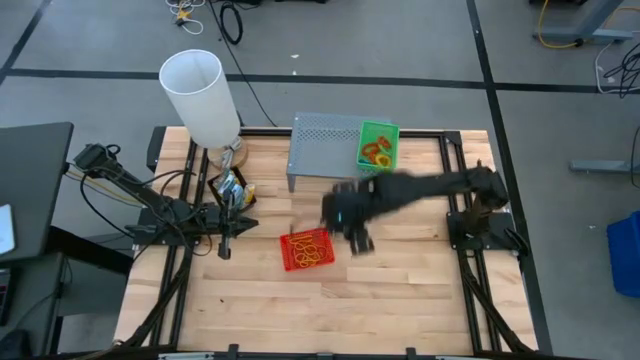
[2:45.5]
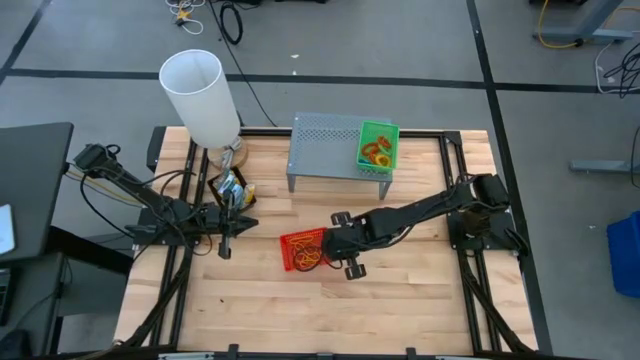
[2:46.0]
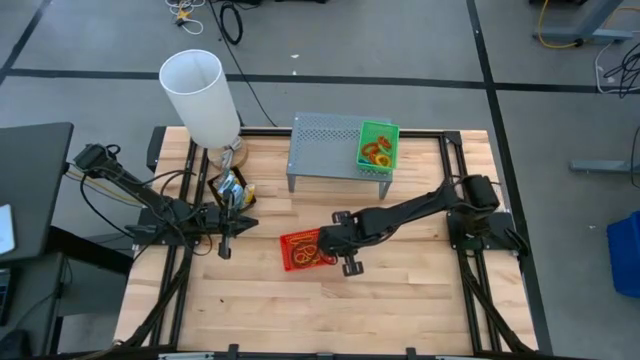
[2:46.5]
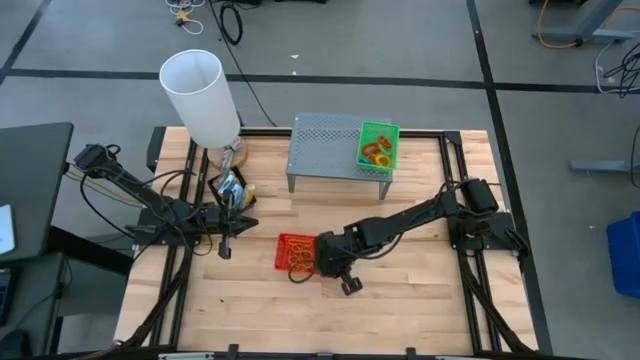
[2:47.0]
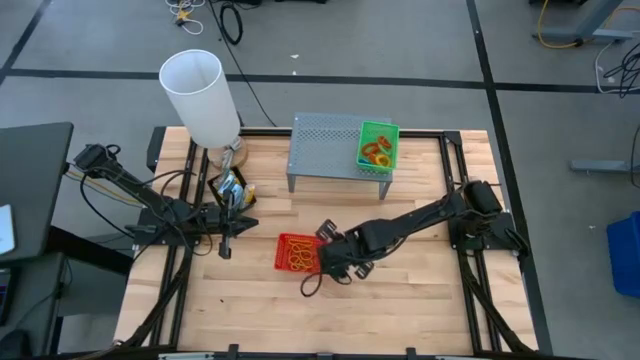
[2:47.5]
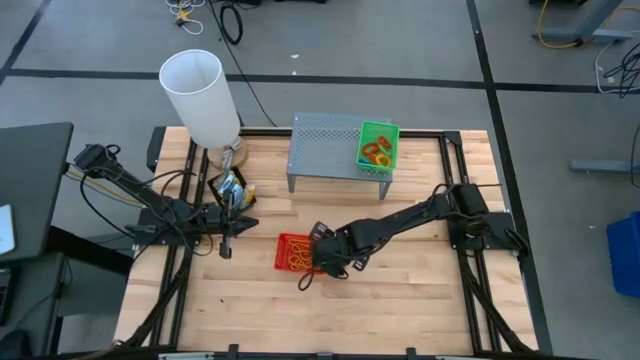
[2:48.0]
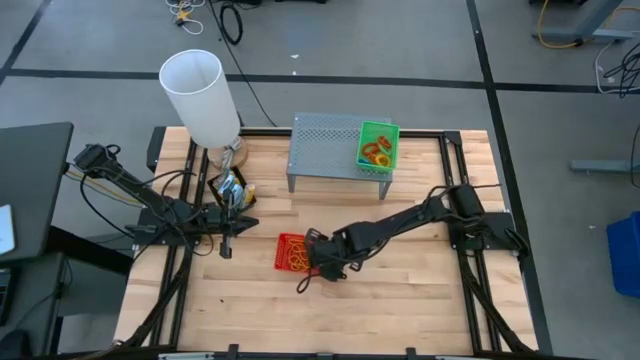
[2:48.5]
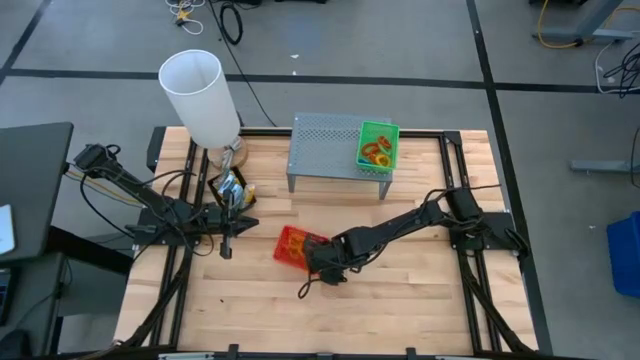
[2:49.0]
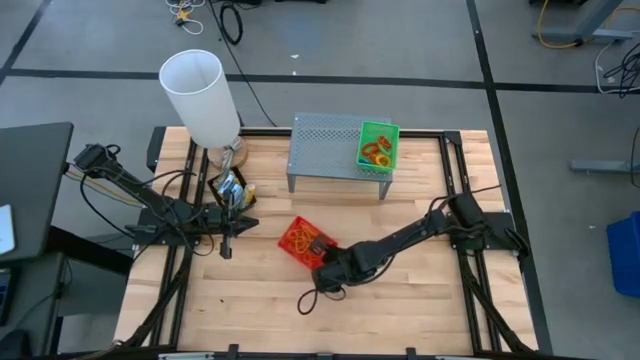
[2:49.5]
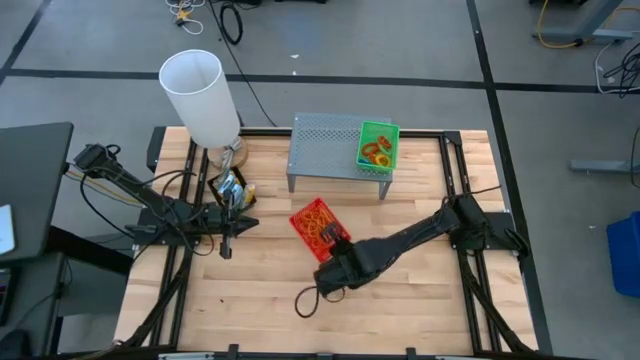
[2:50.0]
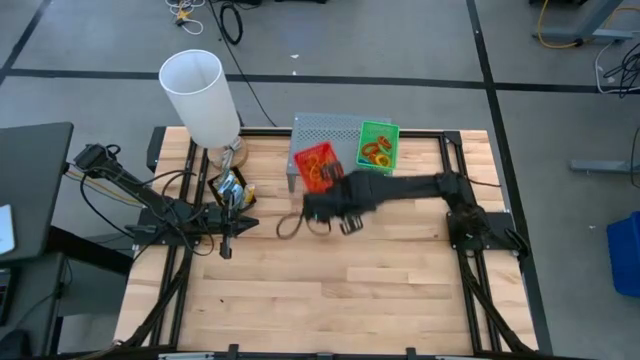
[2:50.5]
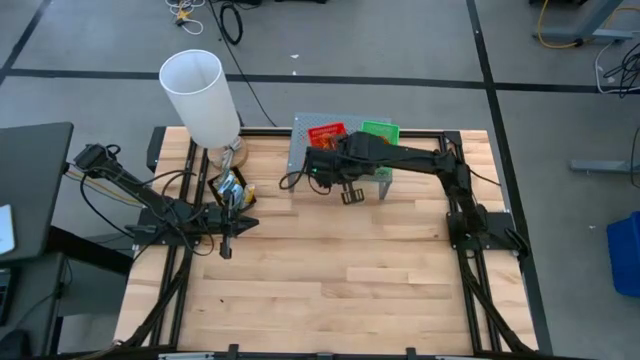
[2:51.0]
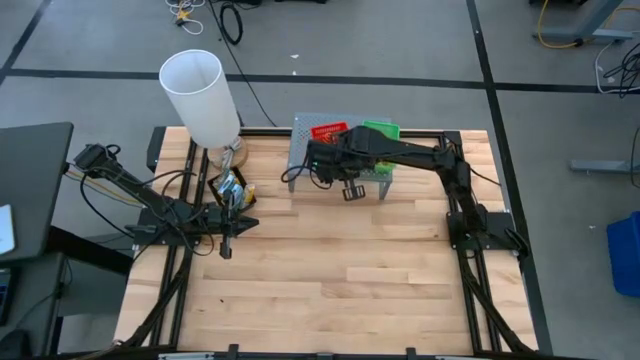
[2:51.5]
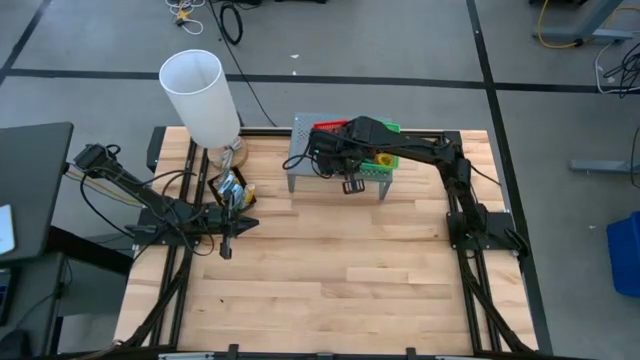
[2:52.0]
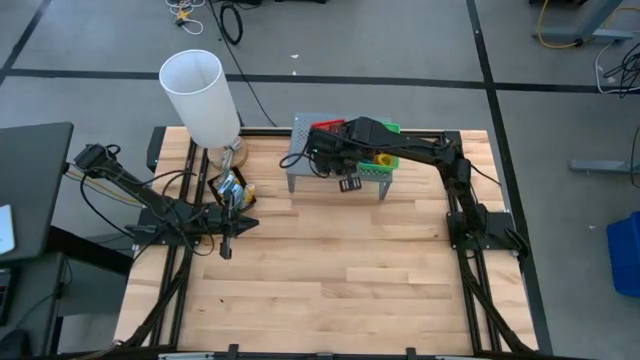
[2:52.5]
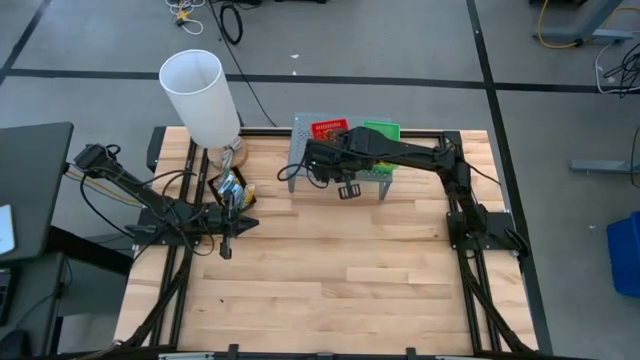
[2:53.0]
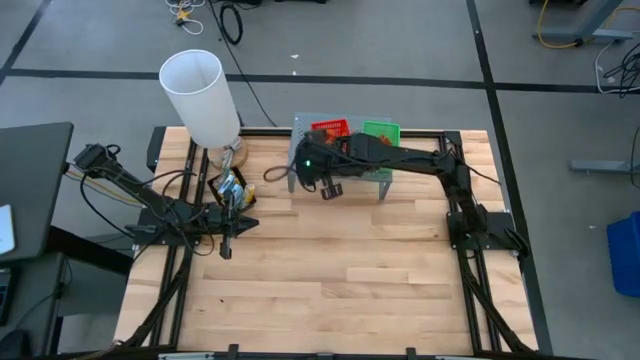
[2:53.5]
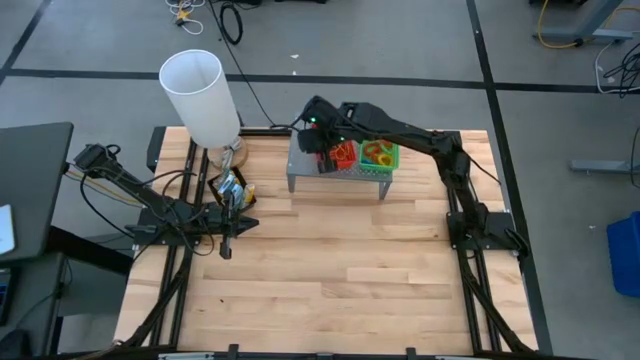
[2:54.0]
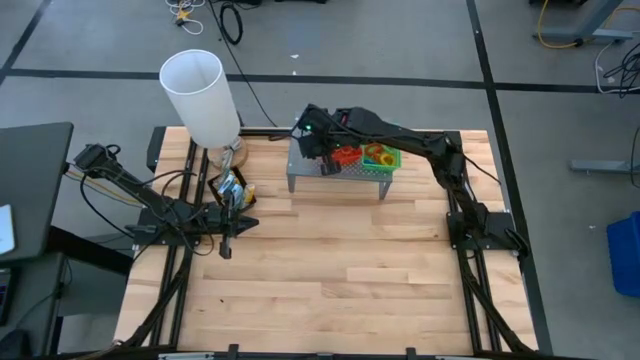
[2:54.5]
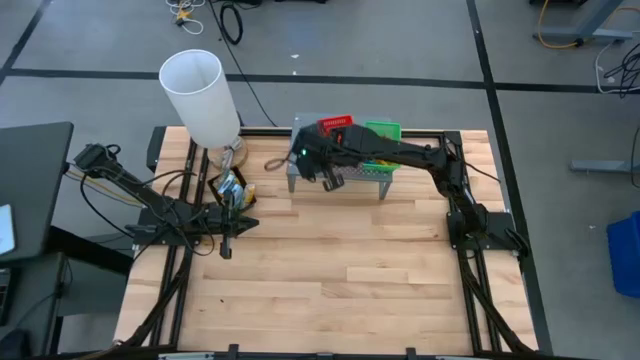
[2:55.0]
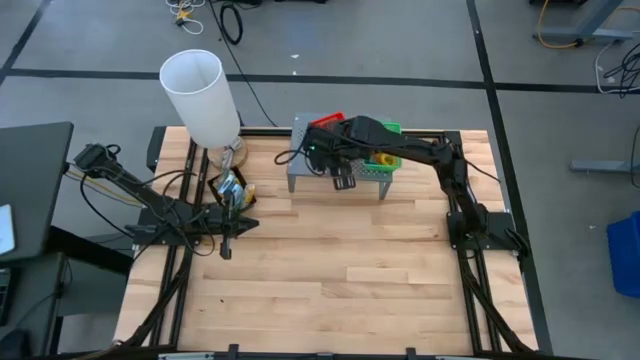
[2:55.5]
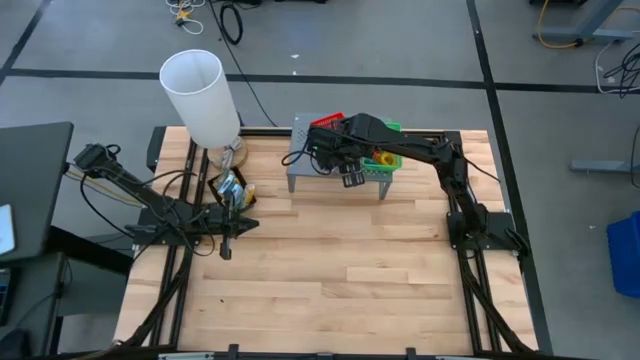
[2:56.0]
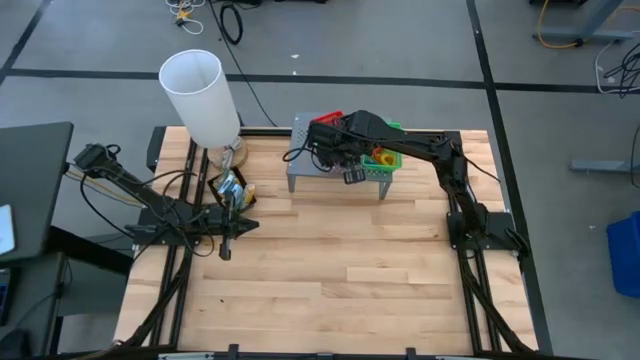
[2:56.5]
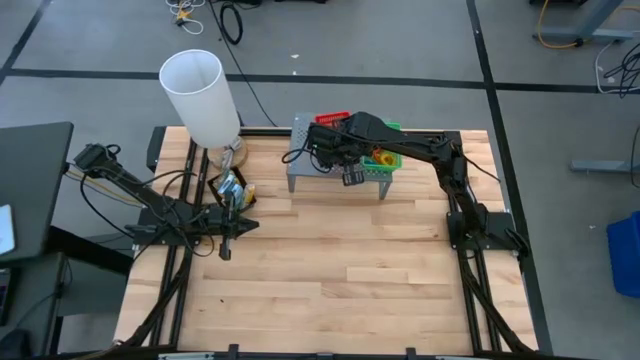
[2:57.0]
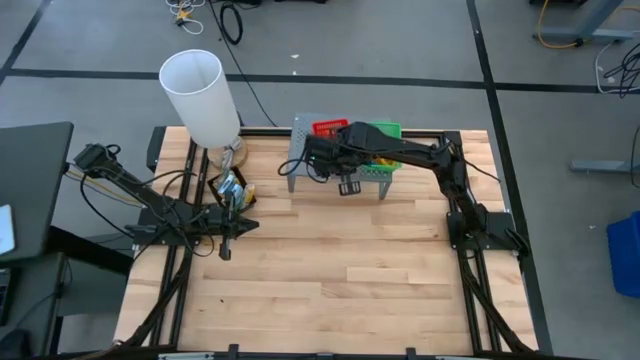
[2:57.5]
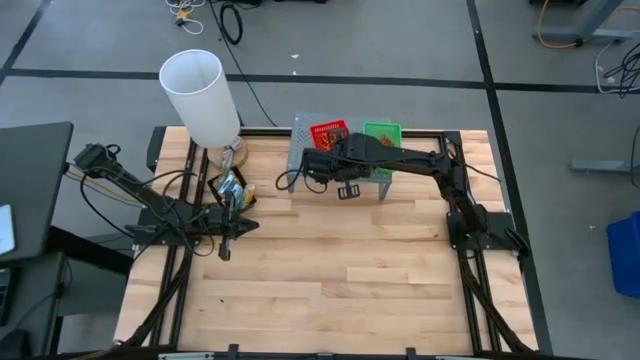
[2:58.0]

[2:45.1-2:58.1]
Task: Pick & Place Office Desk Supplies
Put the red bin on the shelf

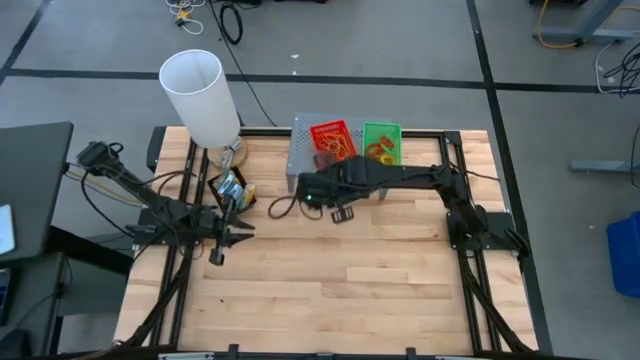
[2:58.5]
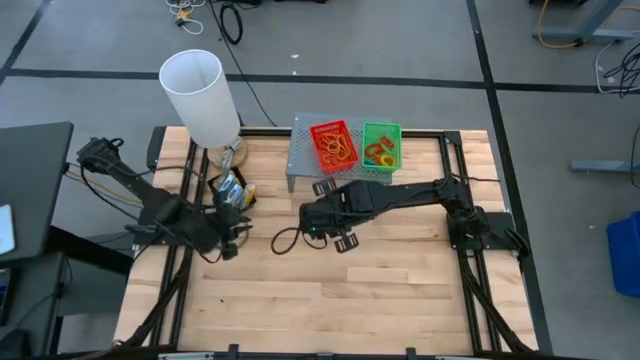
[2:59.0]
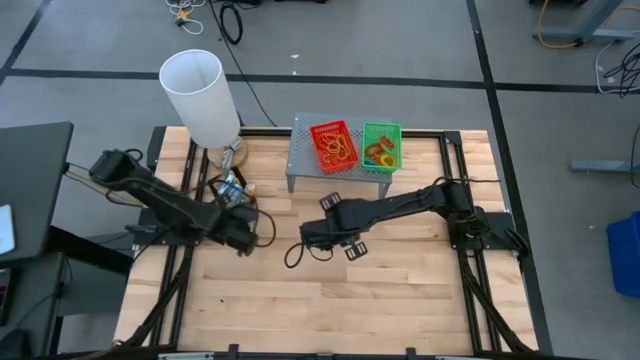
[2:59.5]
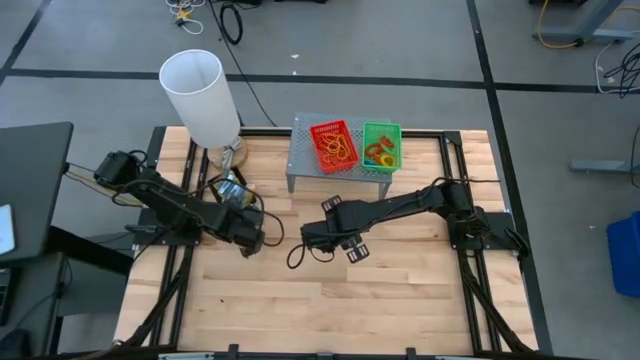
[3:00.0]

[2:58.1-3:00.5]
Put the black bin on the shelf

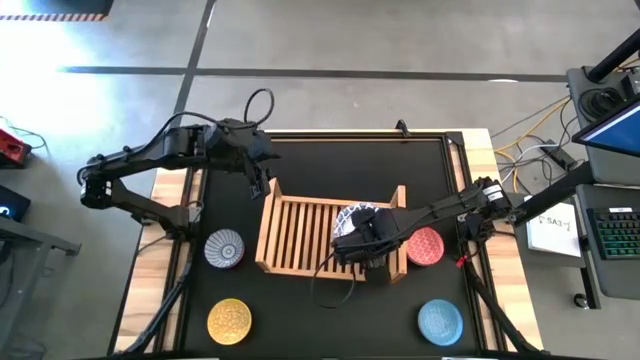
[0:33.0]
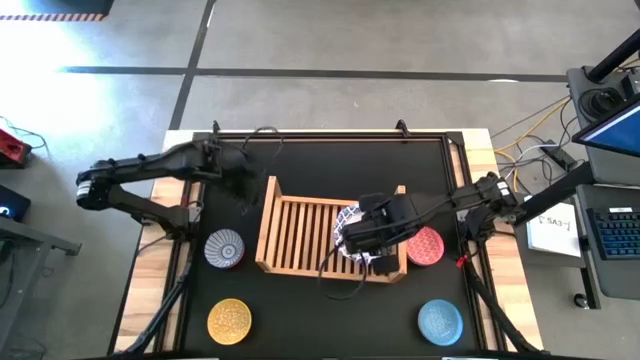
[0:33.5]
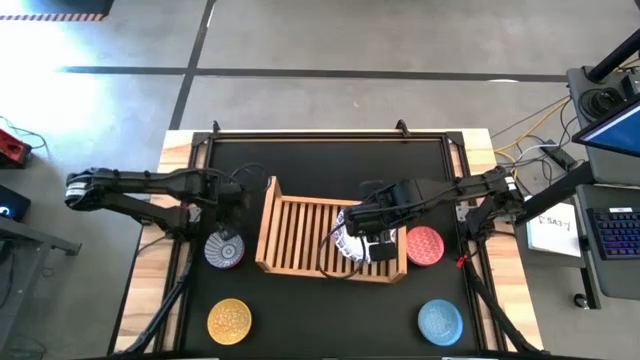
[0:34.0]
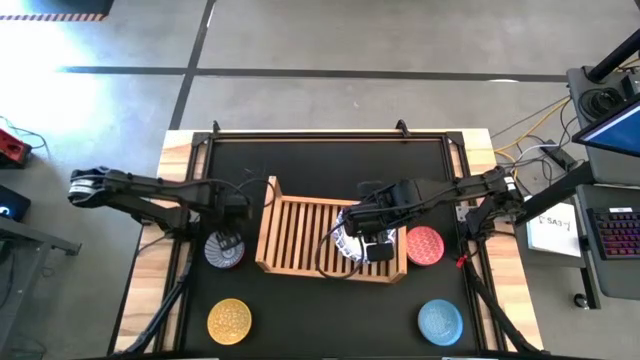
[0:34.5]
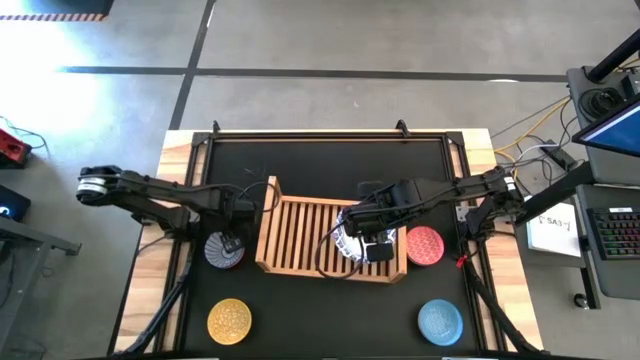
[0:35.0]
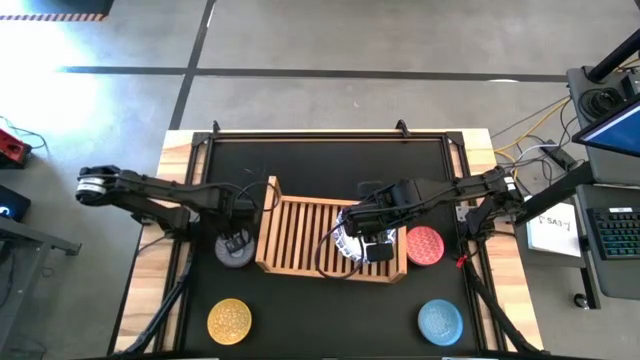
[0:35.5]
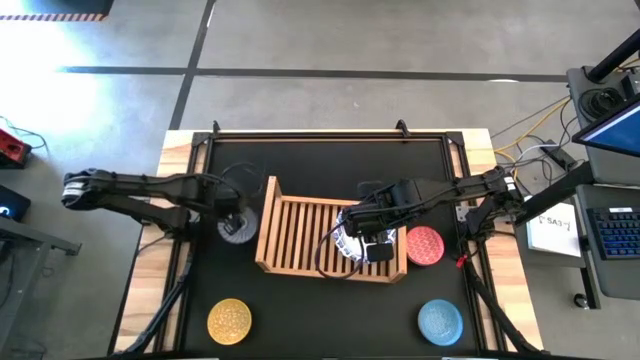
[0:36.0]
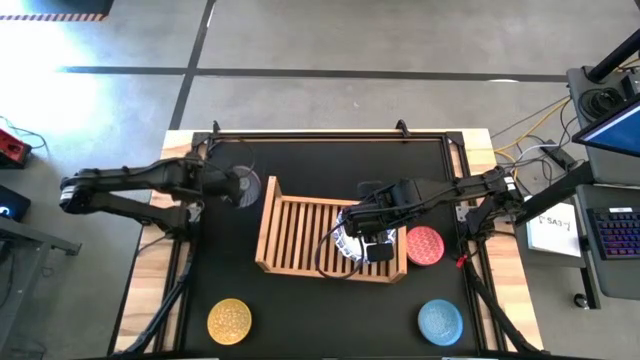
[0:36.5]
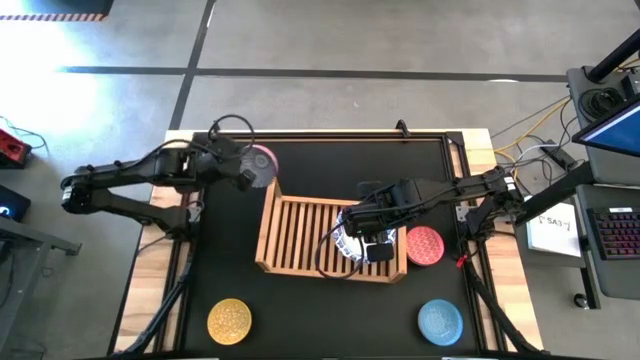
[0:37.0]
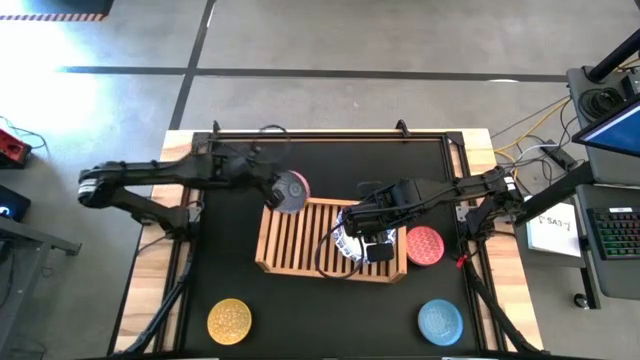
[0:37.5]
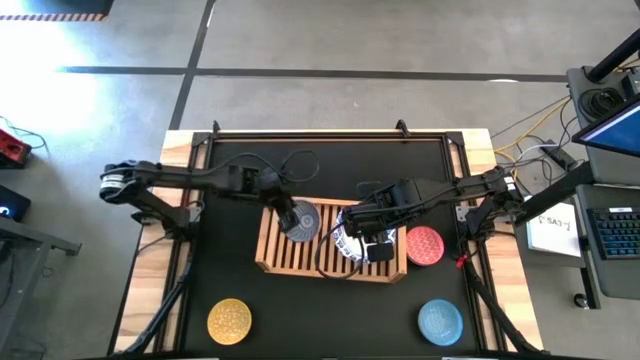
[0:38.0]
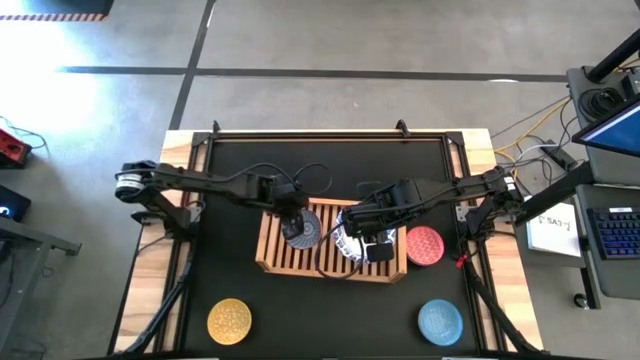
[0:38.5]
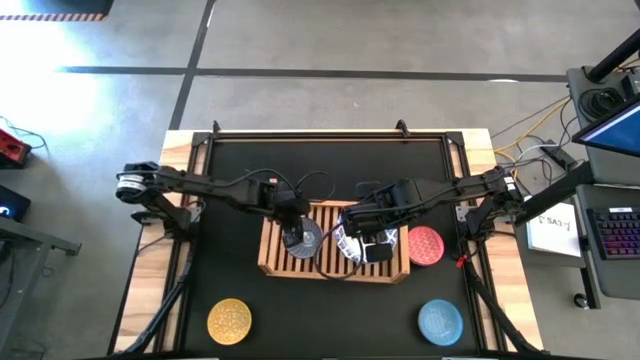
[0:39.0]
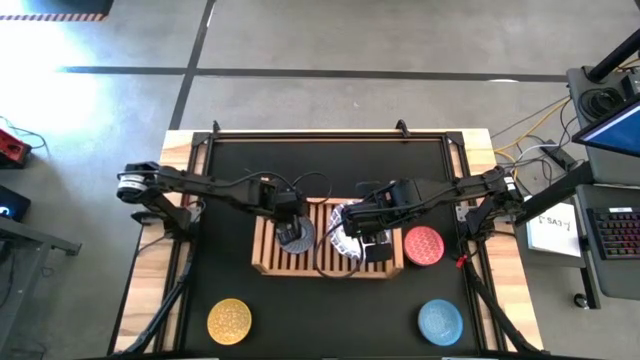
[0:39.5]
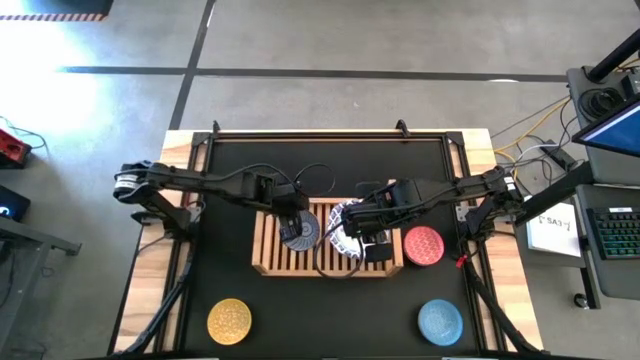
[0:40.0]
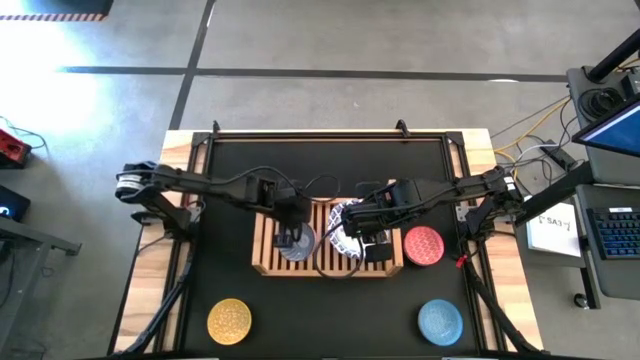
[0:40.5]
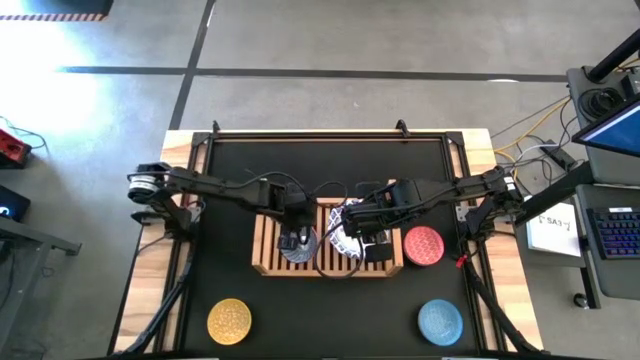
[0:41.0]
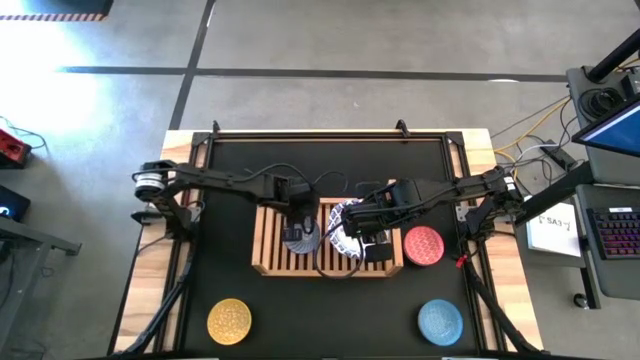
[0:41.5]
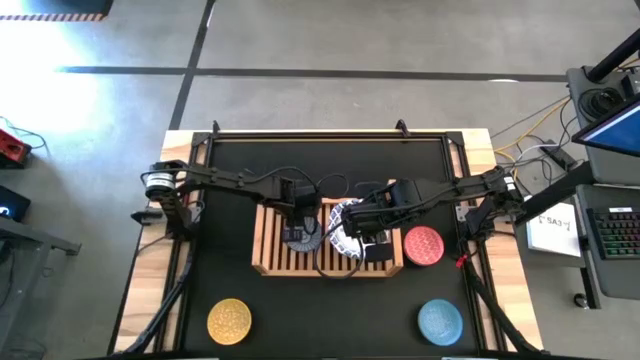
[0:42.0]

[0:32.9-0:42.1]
Task: Place and stack bowls onto a shelf
Put the dark blue patterned bowl on the shelf
